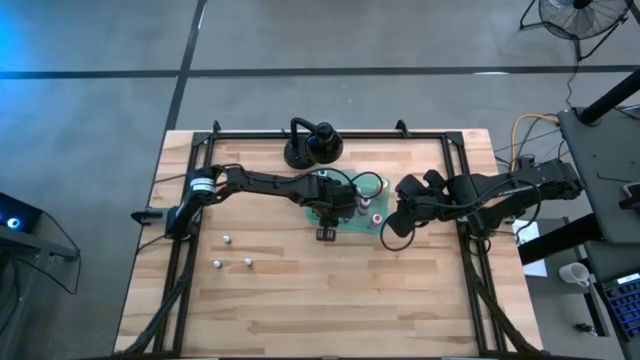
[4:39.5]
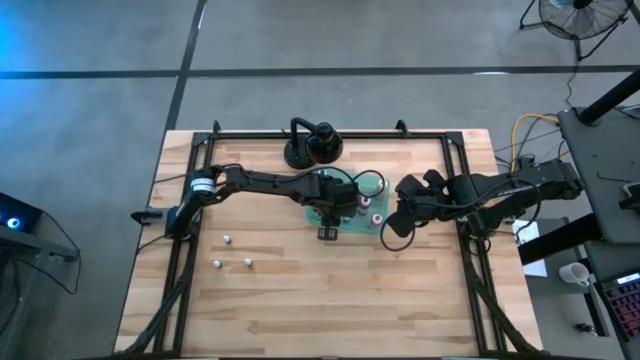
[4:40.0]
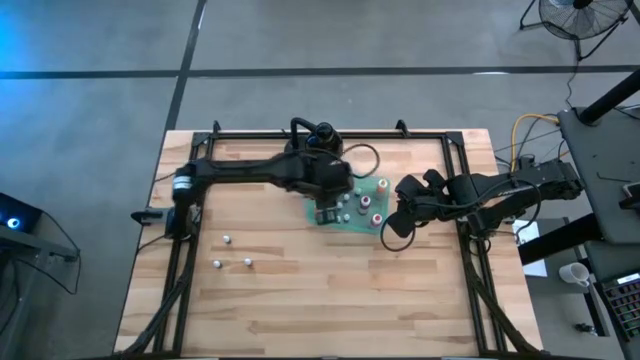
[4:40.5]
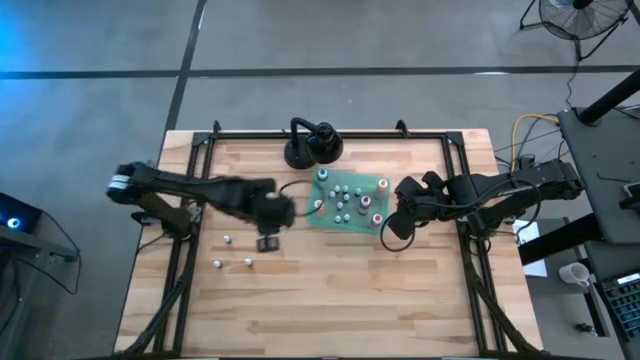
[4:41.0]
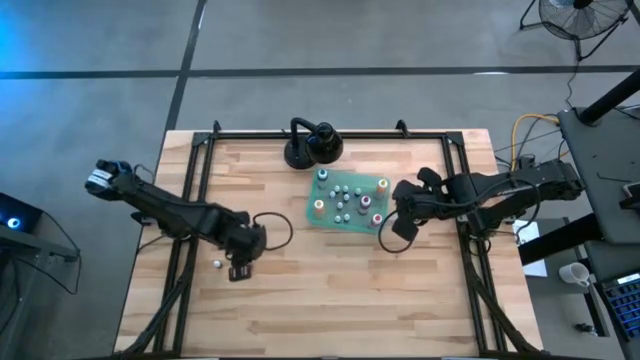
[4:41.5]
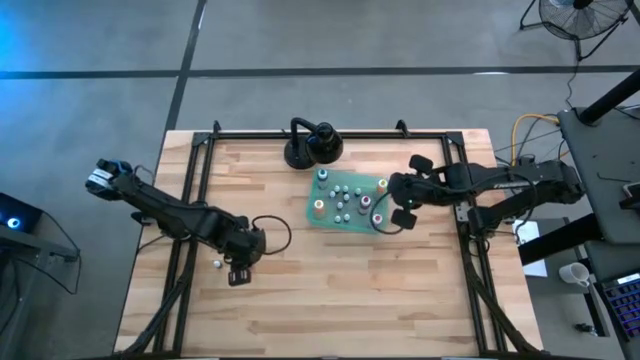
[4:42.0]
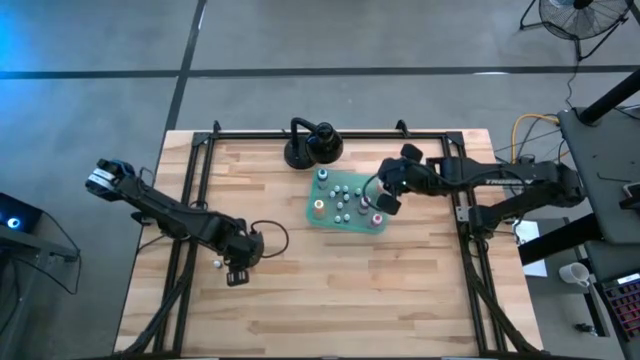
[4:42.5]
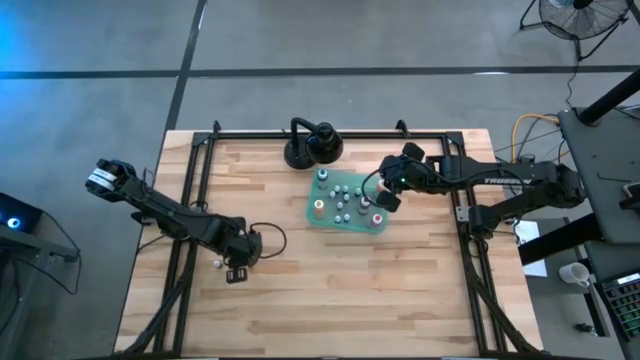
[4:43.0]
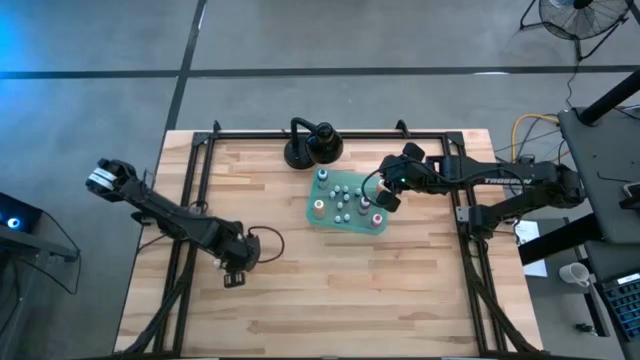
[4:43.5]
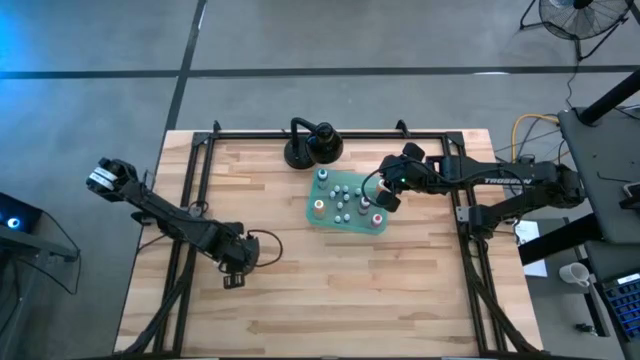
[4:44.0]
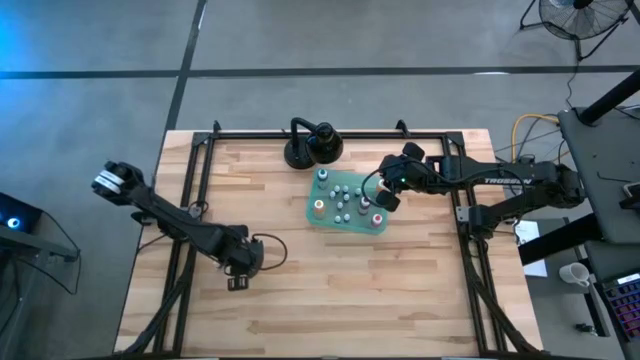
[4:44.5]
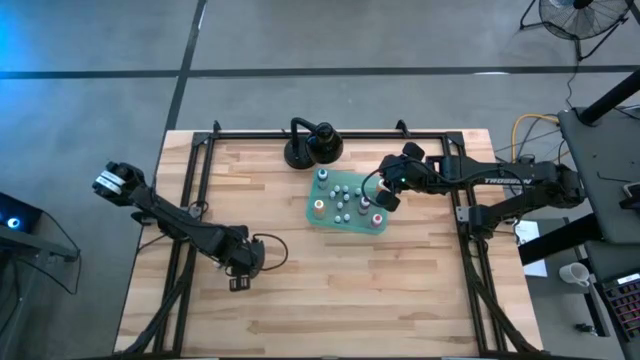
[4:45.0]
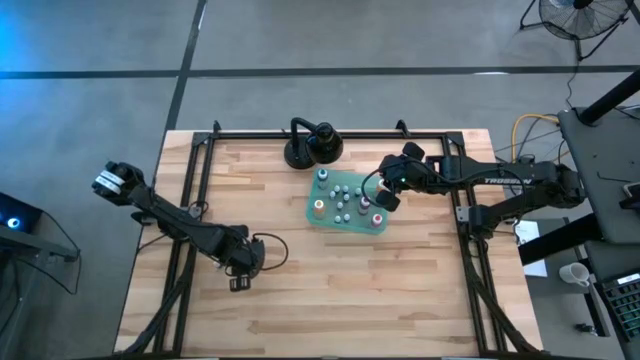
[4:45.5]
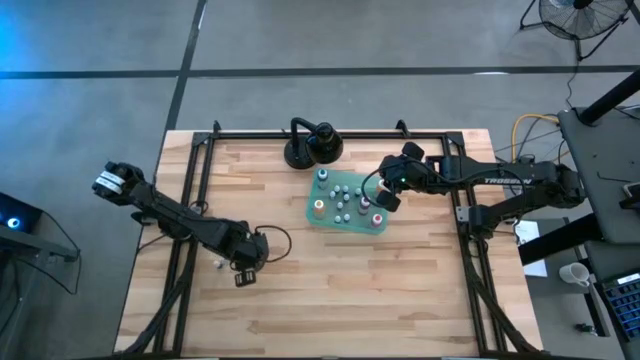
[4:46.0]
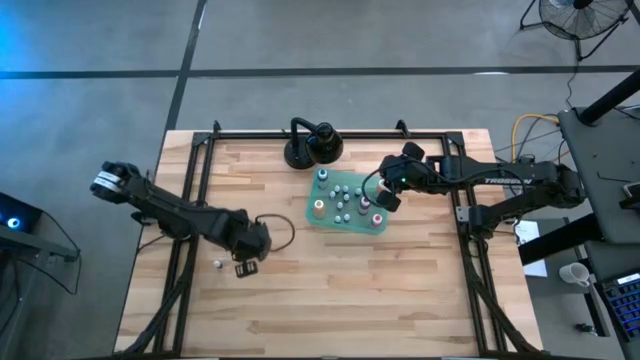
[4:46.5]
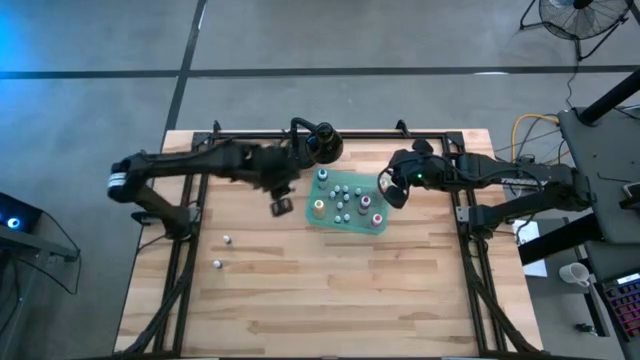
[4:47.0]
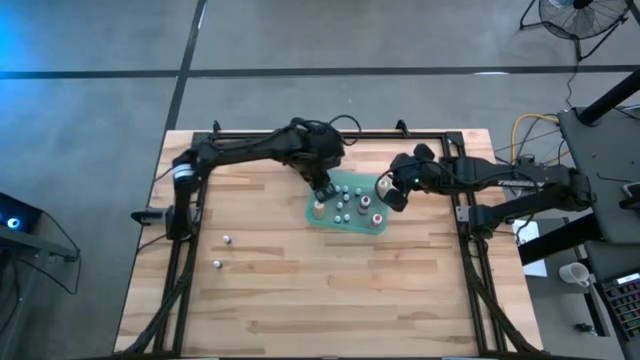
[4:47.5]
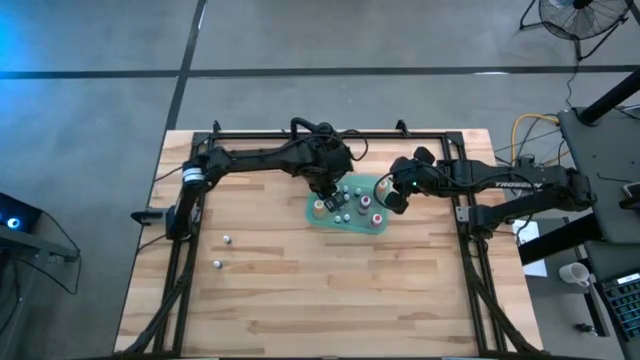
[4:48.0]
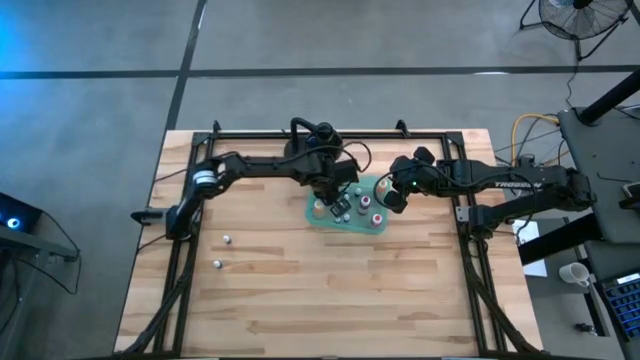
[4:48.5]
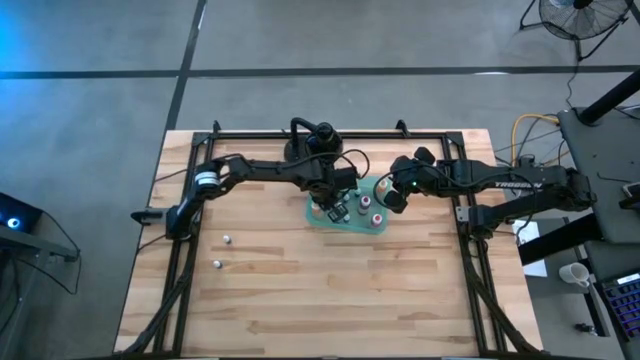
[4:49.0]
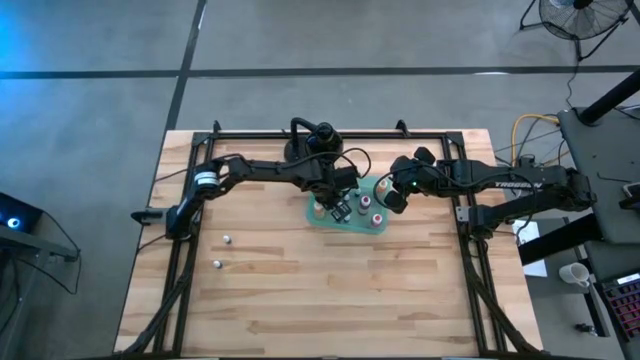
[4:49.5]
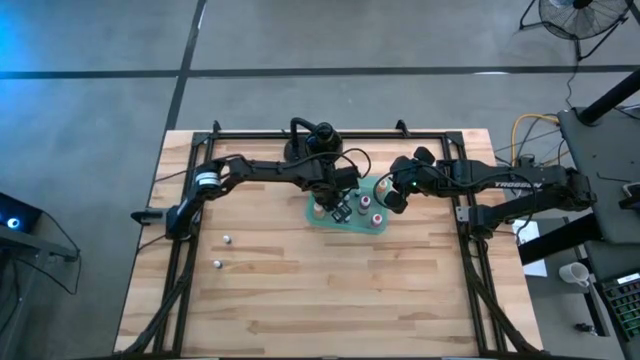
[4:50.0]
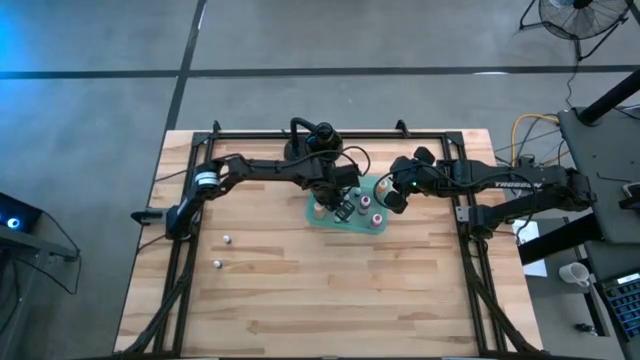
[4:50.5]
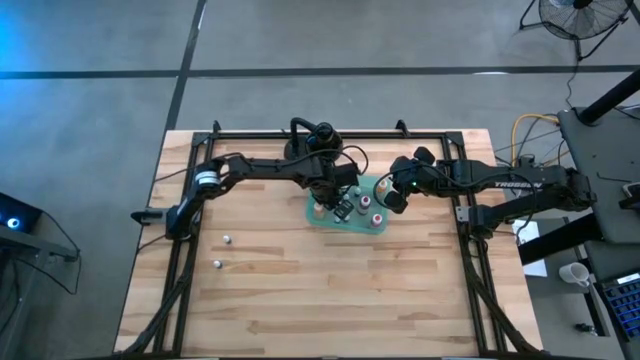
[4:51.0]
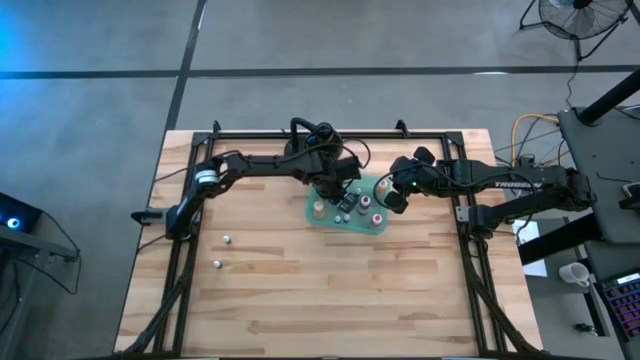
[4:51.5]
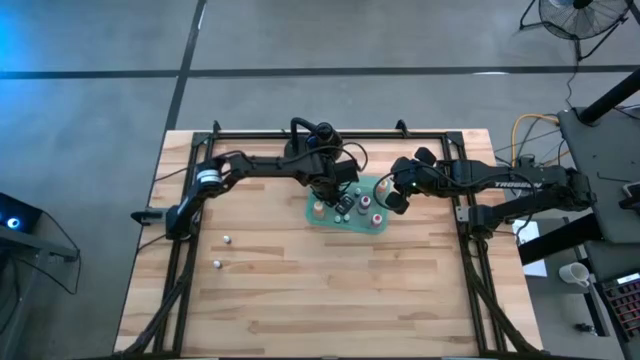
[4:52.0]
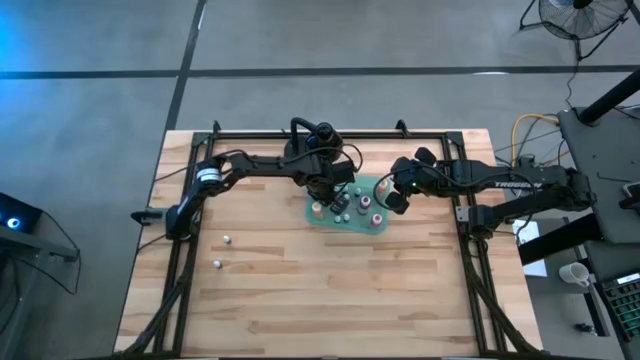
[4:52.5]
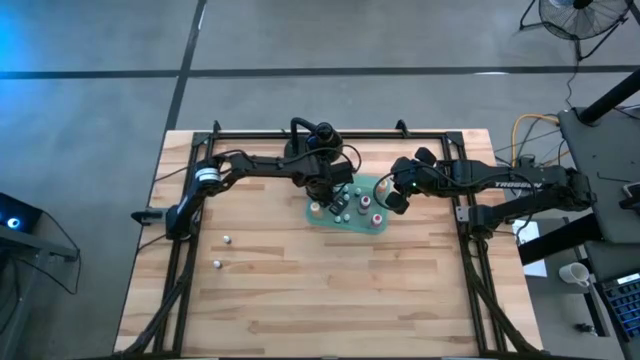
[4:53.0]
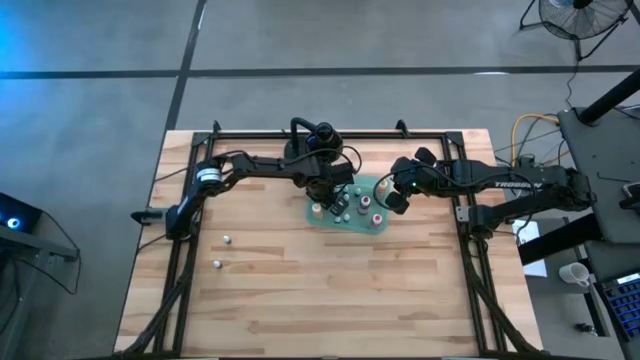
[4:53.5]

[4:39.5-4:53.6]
Task: Pick & Place food coloring
Put the pink food coloring bottle into the bin

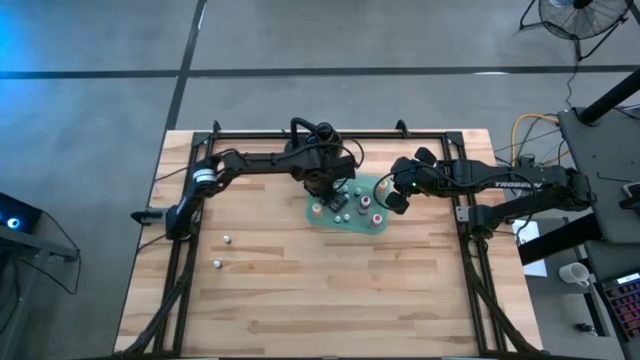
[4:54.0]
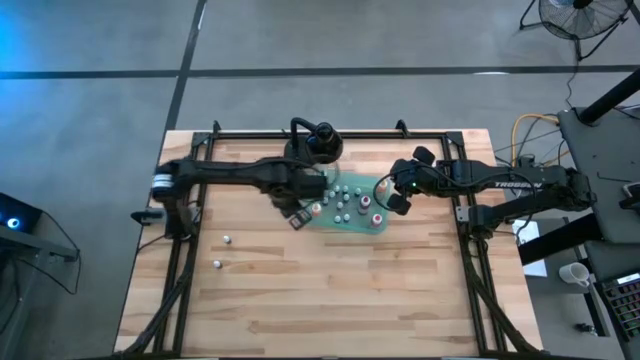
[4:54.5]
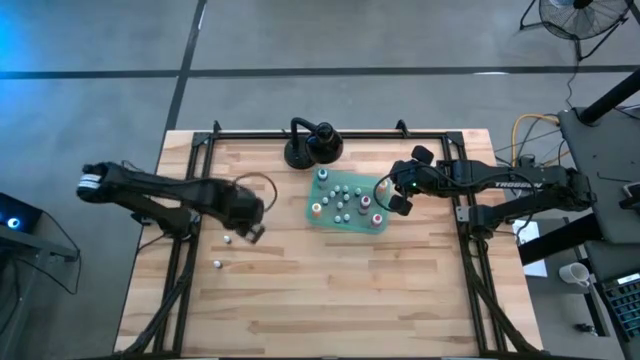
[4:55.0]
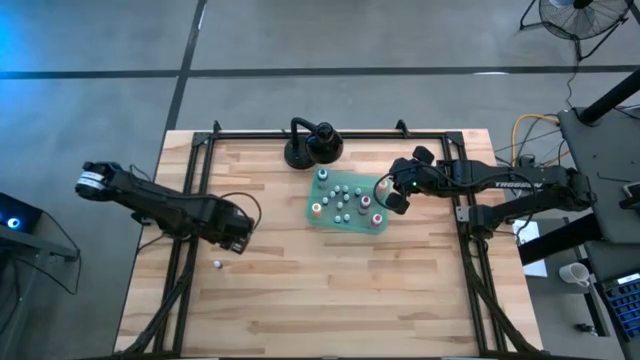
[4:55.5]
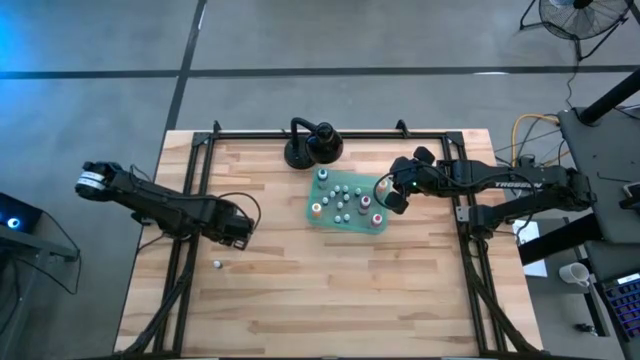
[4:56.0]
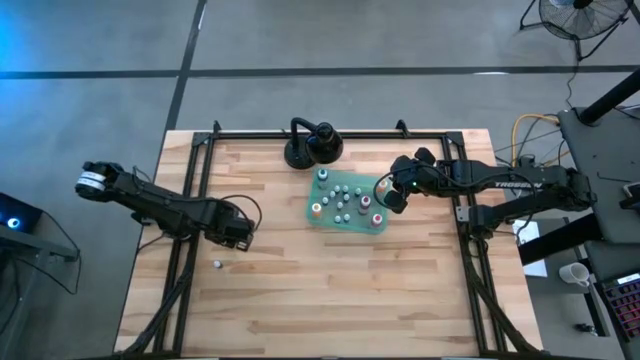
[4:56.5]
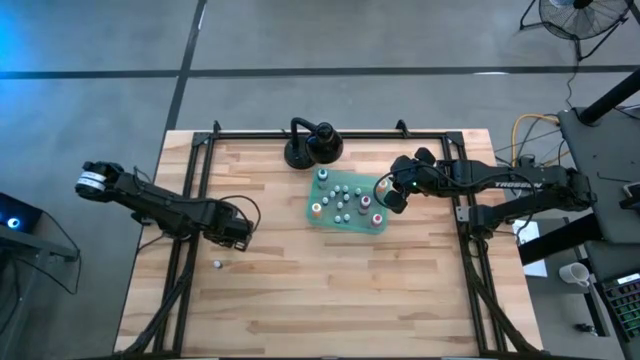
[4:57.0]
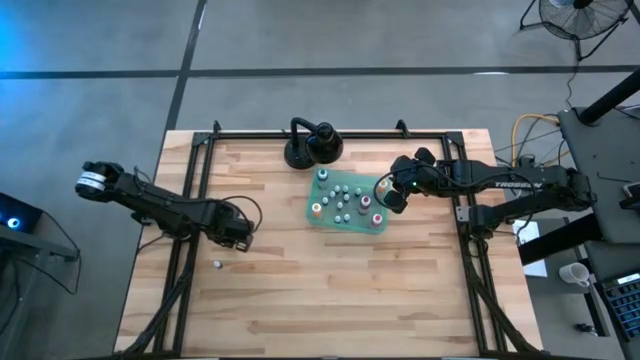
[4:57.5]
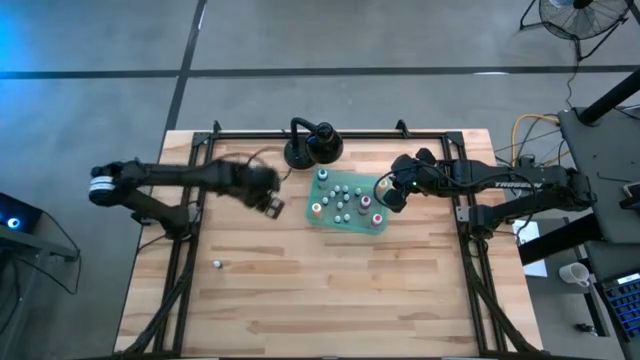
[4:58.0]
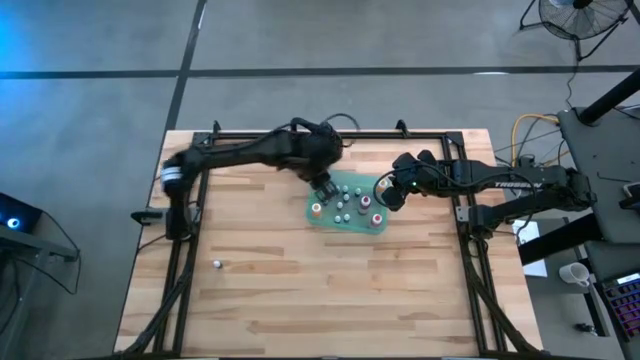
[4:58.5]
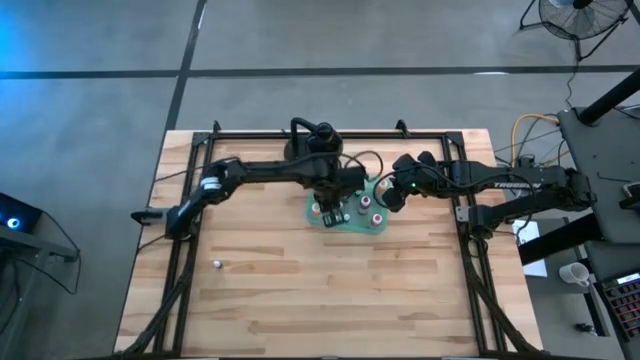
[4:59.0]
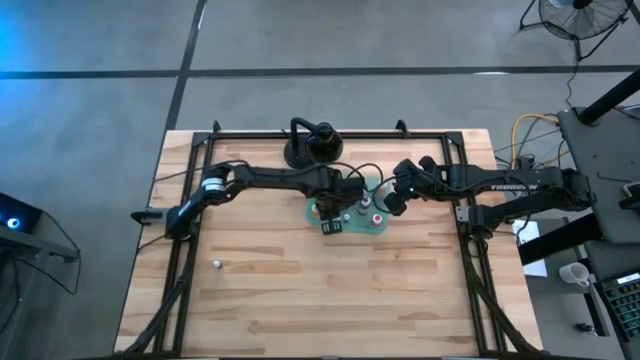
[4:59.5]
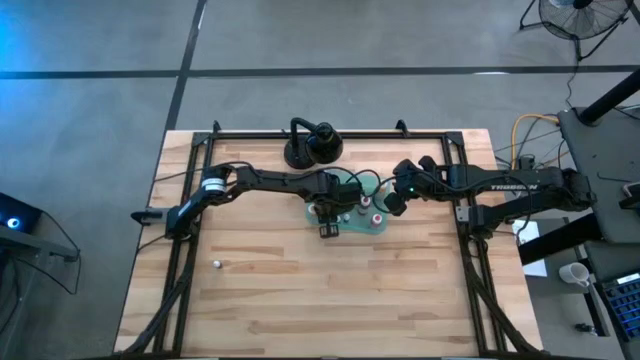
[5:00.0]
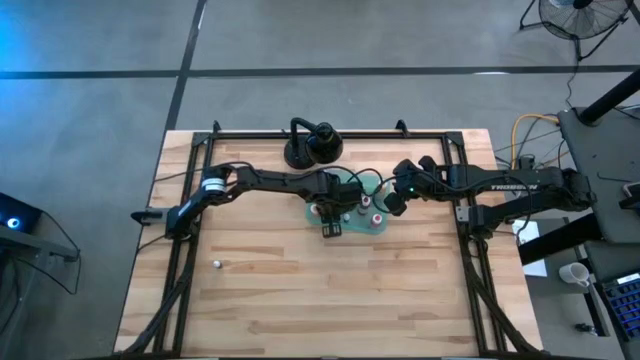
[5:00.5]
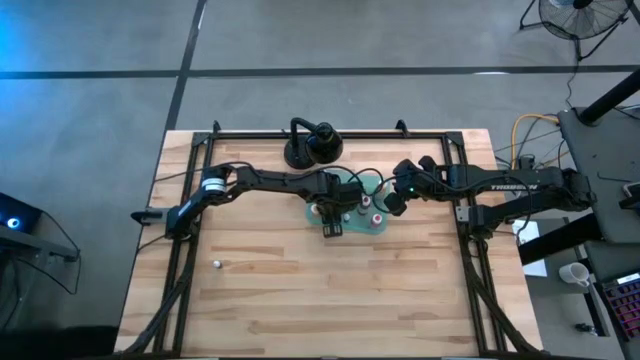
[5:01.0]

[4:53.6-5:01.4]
Put the violet food coloring bottle into the bin
